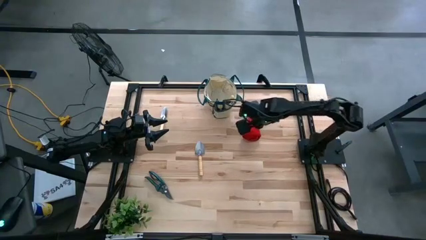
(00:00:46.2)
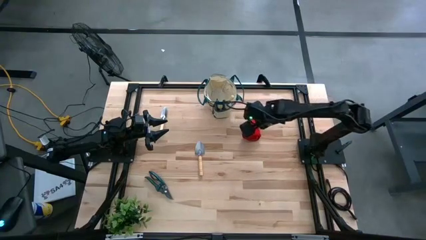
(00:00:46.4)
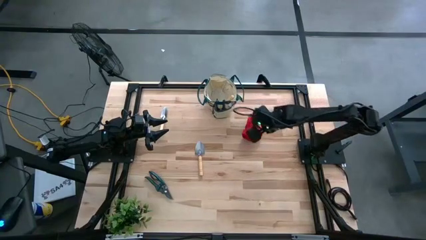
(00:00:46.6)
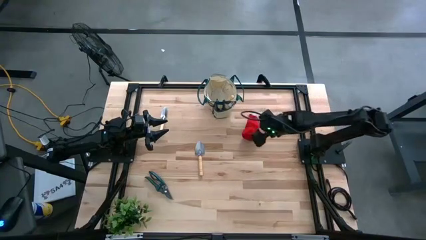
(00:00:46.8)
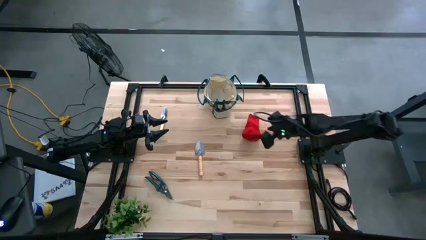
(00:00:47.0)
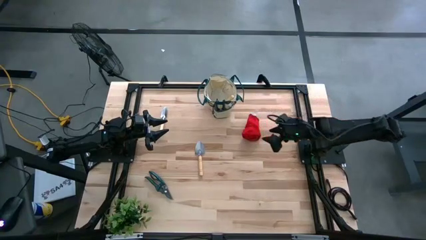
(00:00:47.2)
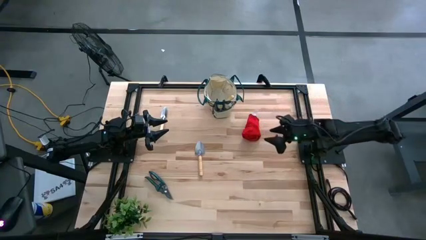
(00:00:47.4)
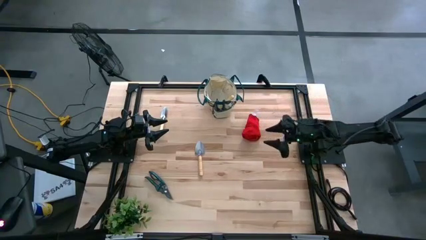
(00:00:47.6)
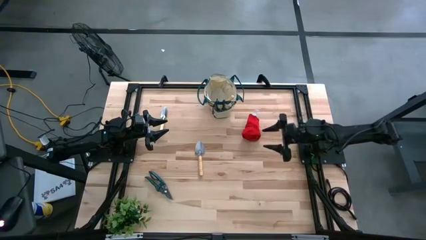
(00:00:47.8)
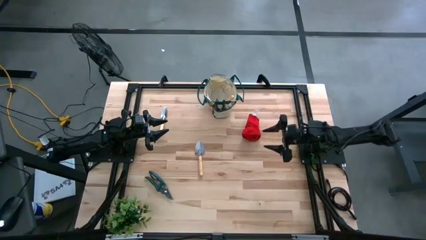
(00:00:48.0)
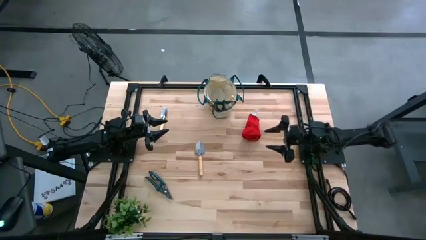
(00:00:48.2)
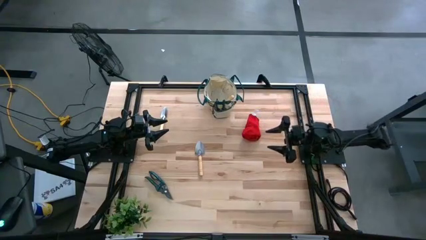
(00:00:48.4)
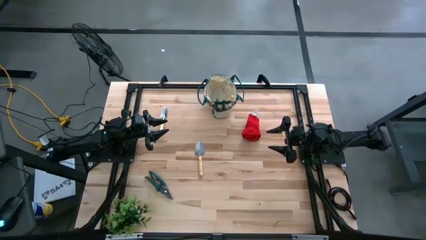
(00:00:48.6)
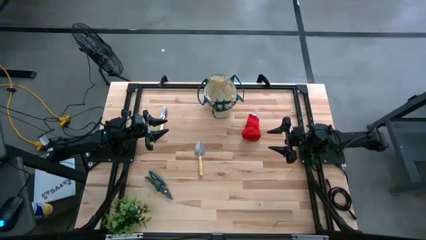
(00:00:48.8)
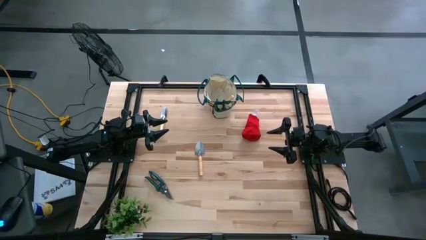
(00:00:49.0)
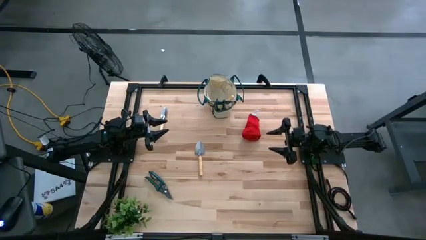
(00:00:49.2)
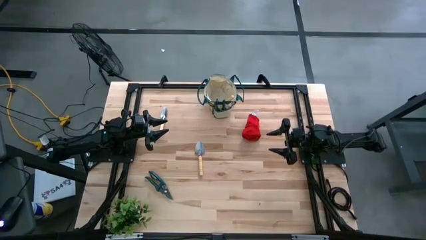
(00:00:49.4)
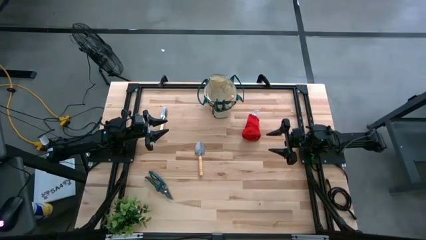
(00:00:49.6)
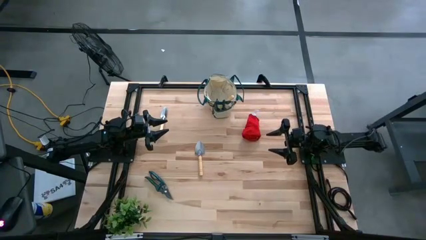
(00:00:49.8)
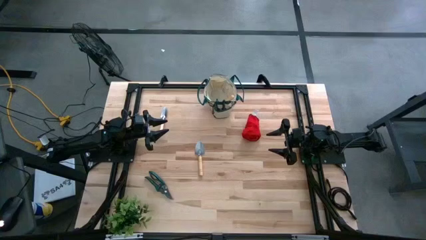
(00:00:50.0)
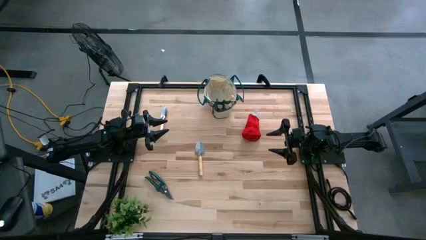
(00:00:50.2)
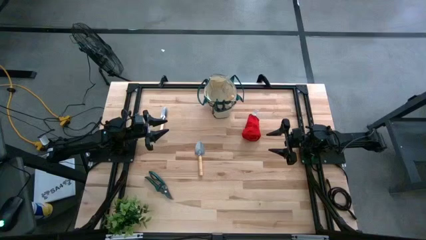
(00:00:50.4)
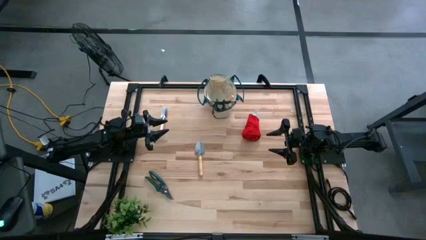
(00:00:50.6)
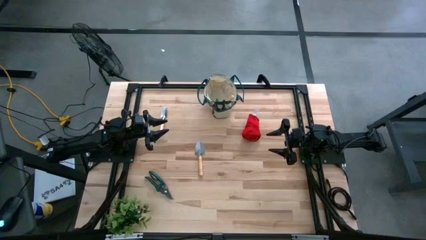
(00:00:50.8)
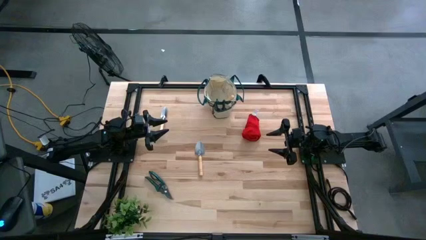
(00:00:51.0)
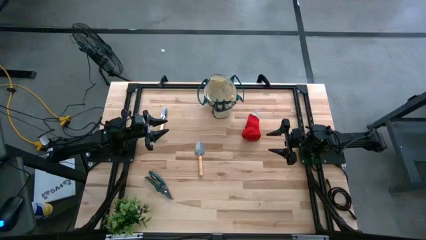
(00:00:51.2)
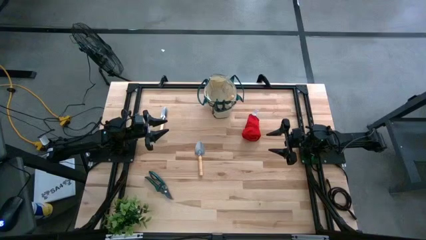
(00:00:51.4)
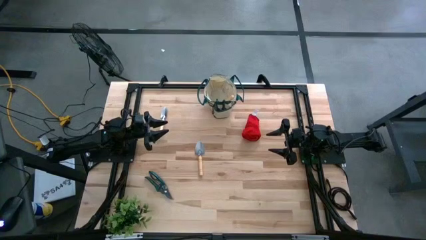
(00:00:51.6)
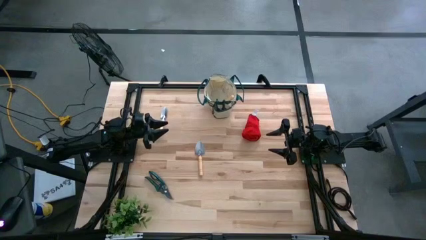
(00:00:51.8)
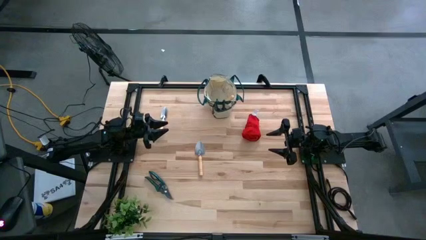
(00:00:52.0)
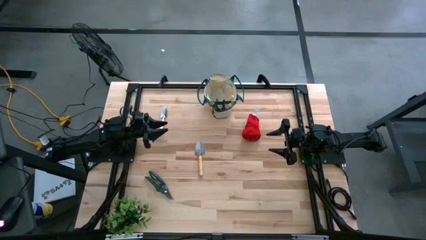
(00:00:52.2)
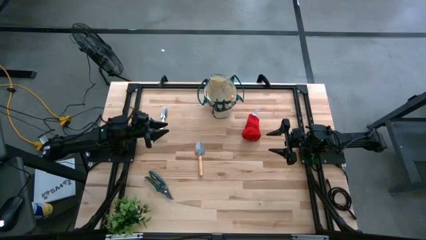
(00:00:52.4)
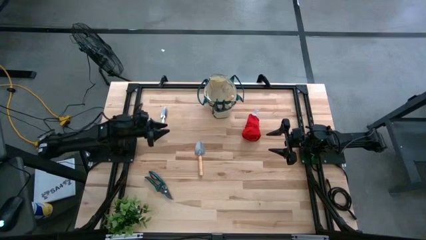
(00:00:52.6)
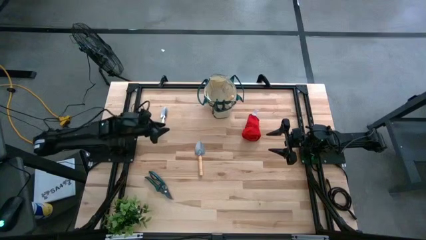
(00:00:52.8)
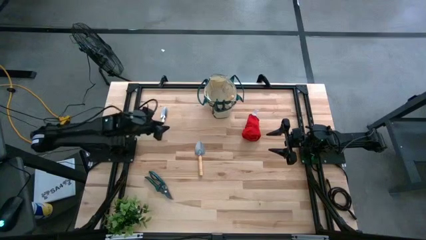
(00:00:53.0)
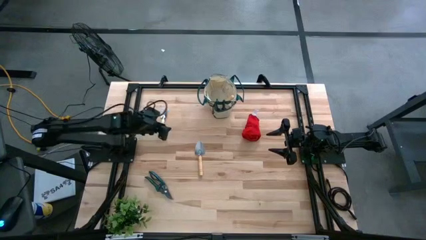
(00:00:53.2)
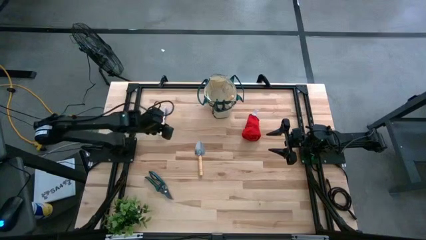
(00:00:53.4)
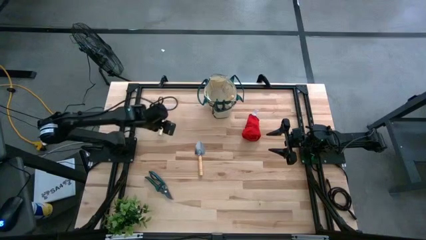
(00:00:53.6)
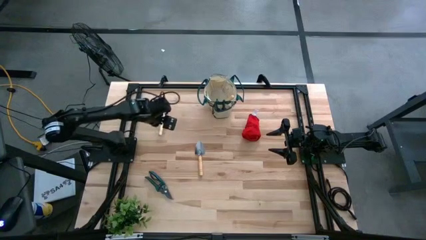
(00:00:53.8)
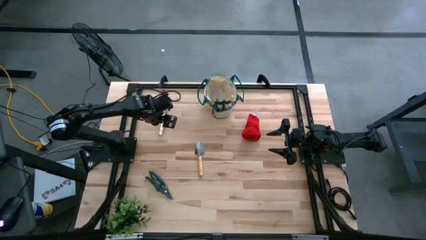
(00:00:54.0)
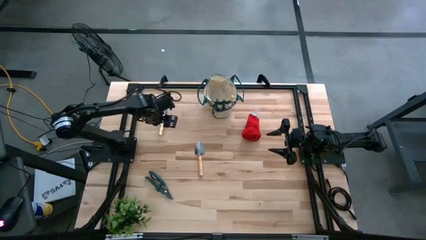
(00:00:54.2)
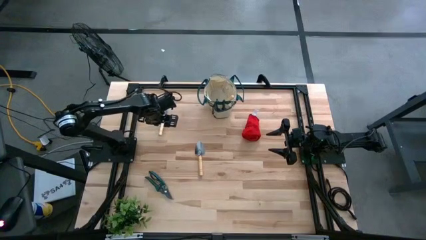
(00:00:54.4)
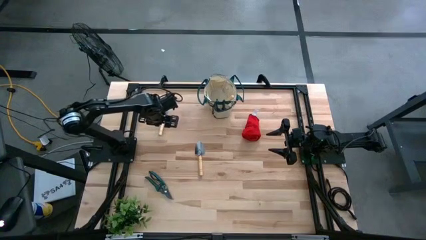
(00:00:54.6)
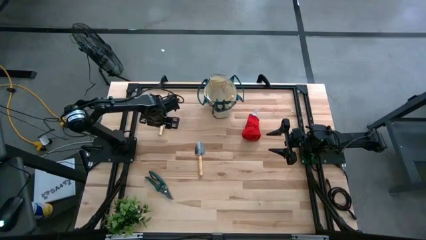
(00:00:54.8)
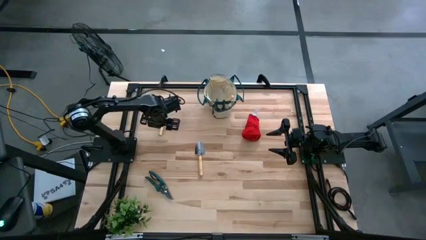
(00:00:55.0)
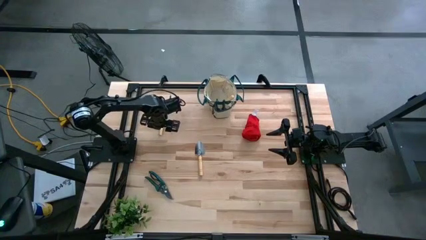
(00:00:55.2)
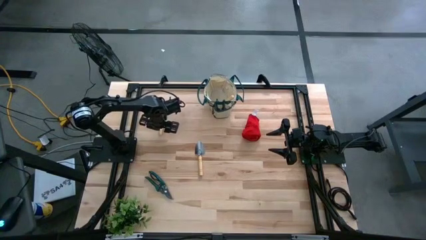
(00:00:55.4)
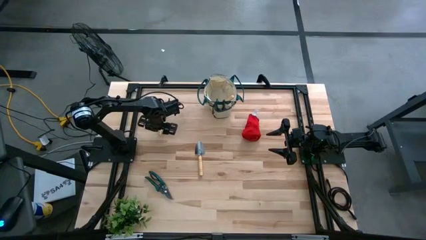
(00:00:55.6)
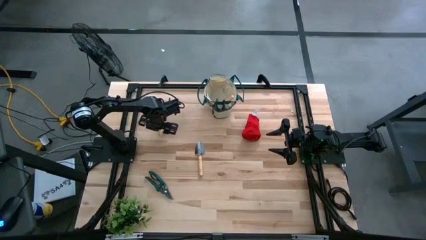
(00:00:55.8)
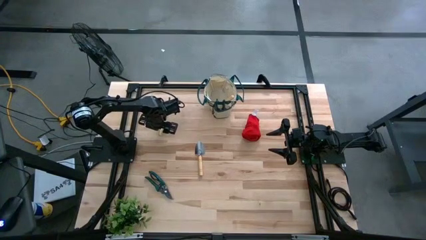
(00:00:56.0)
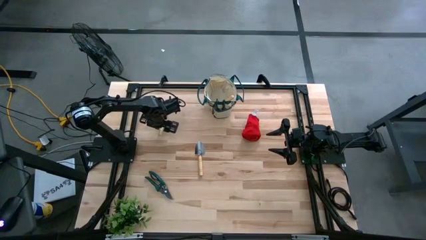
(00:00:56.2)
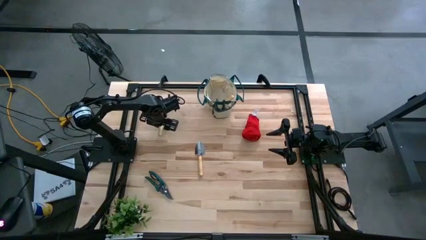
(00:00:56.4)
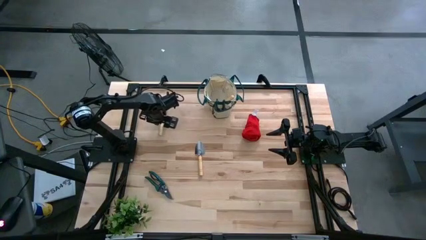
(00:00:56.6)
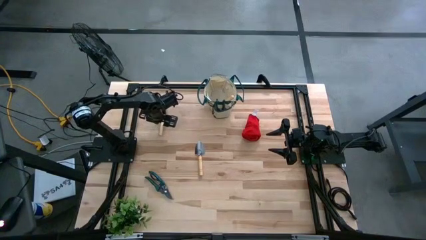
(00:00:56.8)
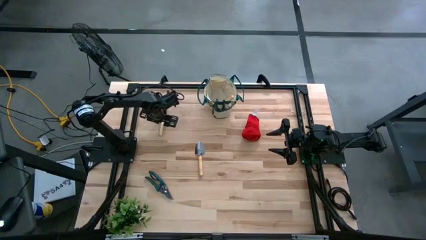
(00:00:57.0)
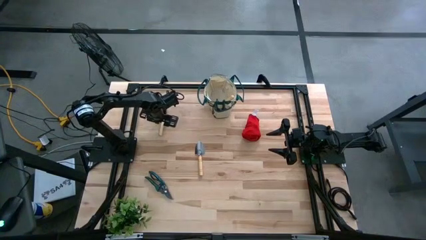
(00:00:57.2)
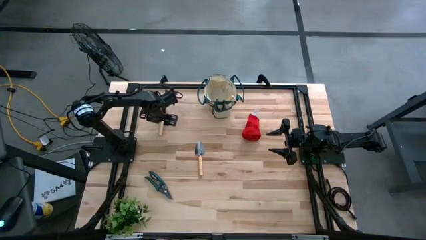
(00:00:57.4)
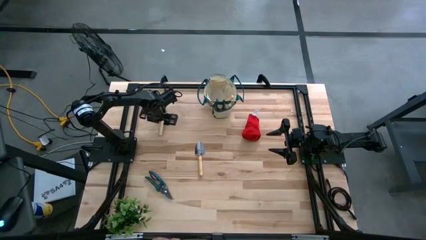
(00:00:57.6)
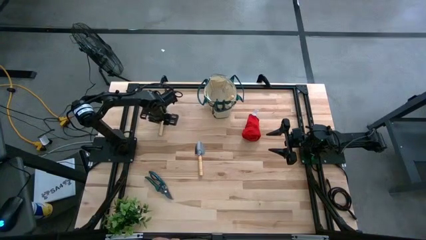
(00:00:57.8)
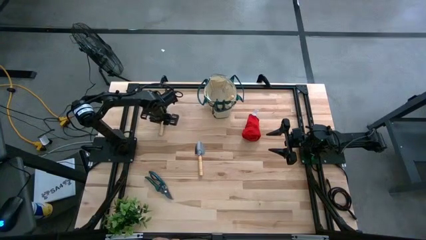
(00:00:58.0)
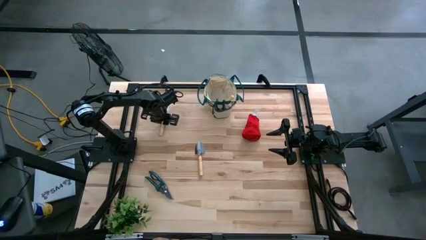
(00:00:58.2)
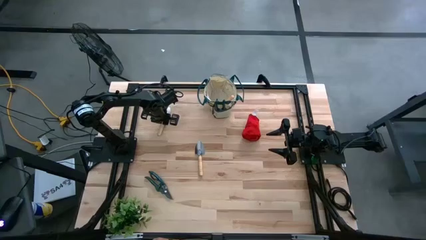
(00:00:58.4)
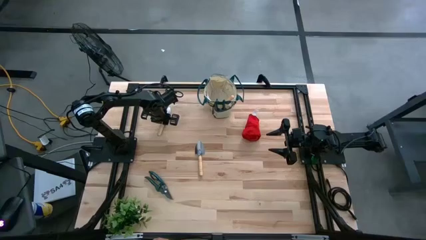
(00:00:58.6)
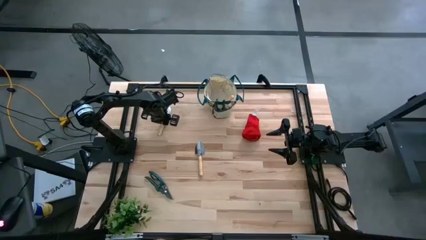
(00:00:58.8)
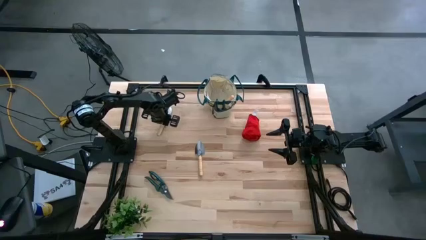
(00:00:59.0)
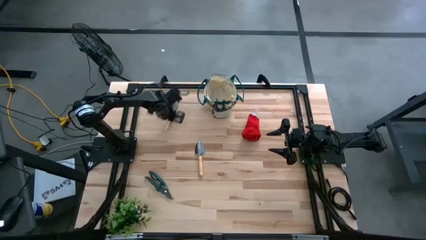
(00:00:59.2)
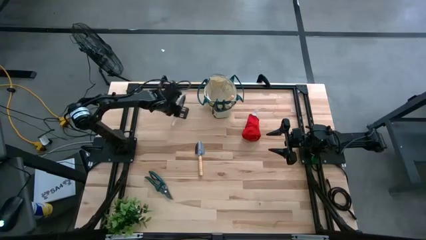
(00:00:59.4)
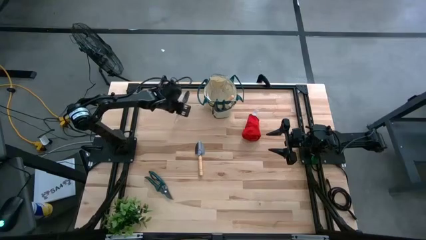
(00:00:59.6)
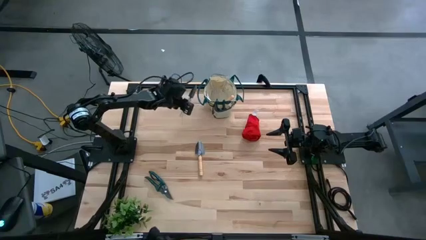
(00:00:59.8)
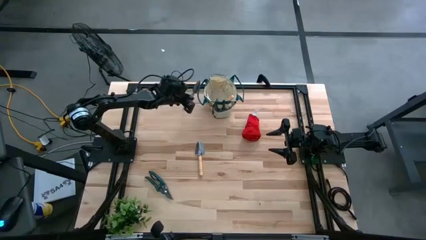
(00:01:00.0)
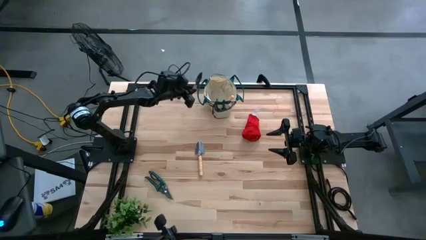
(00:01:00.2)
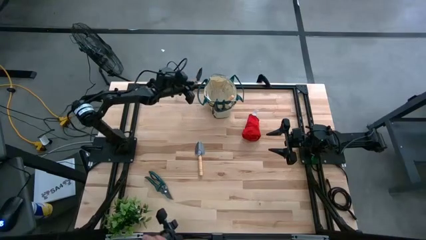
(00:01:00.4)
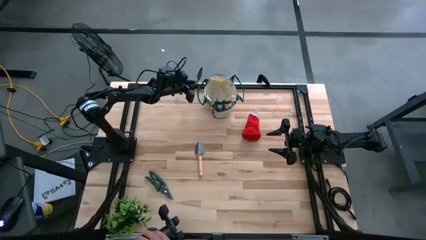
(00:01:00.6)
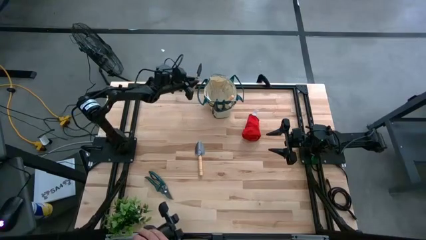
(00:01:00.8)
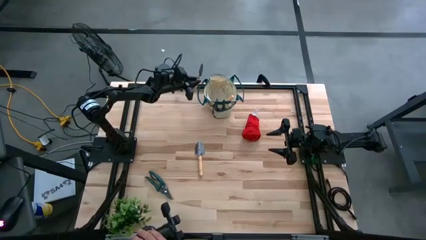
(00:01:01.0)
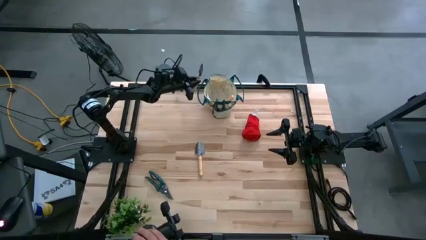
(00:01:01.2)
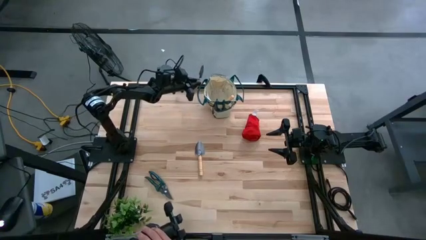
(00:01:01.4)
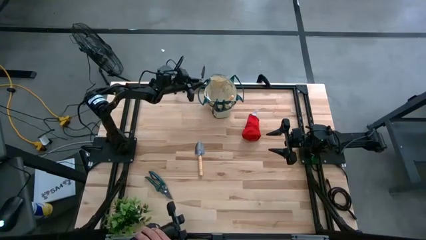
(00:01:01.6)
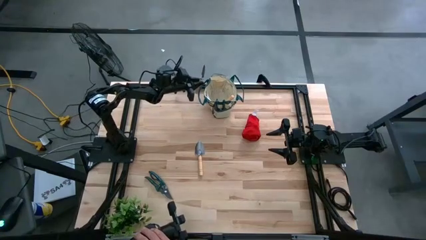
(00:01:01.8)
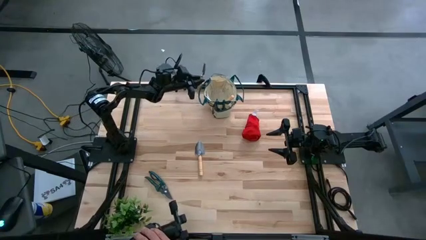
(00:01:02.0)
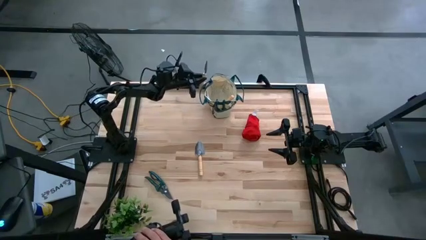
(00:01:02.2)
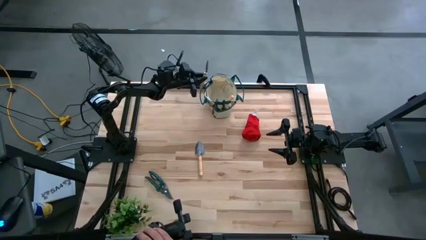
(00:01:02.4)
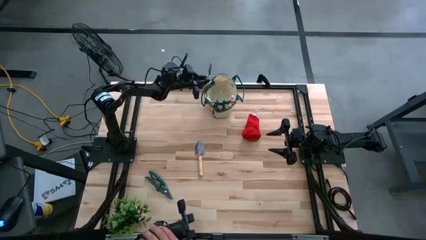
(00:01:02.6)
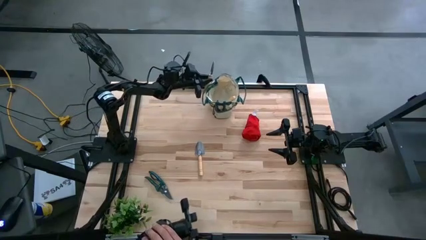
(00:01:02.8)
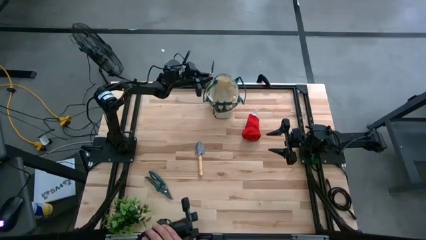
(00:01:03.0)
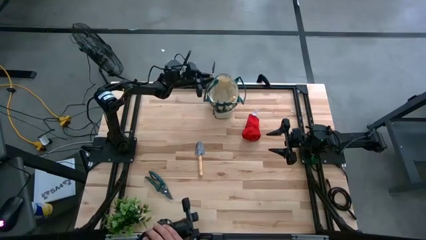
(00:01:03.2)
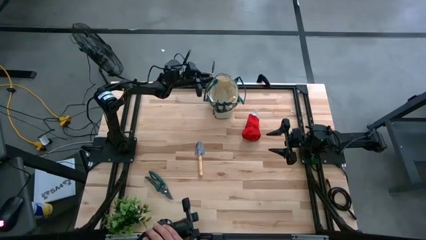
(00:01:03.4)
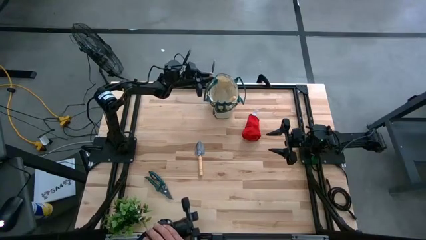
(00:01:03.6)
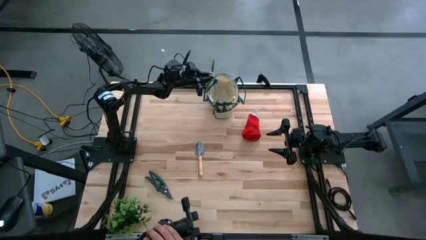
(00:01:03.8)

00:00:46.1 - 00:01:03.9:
Task: Pick & Place Garden tools in Gardening bag
Put the brown trowel into the gardening bag
